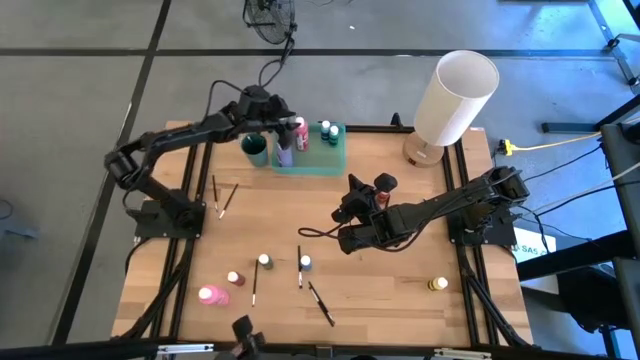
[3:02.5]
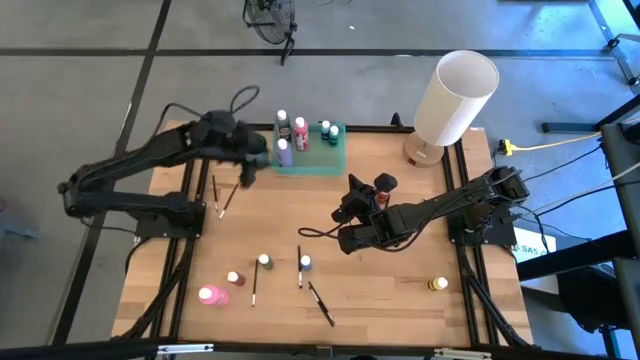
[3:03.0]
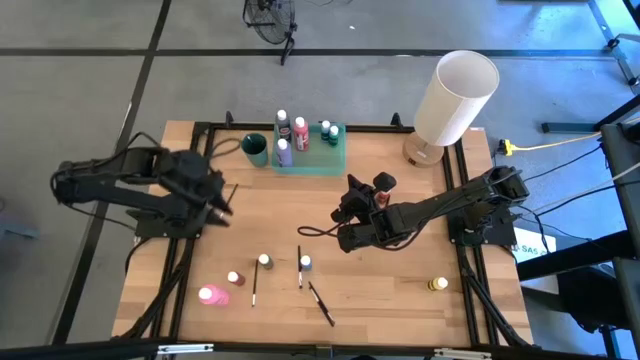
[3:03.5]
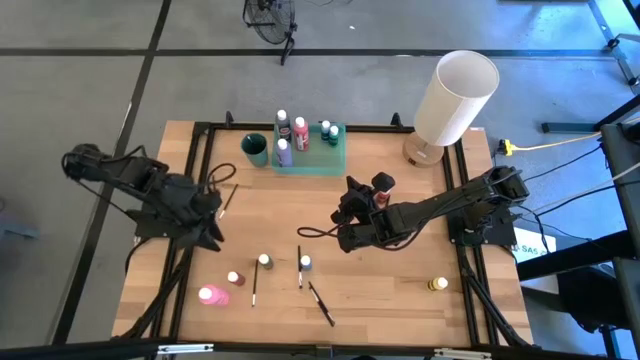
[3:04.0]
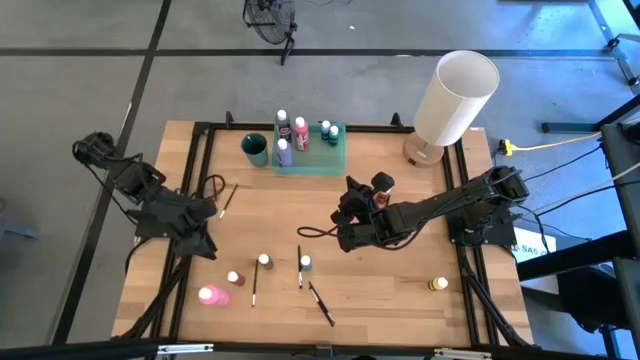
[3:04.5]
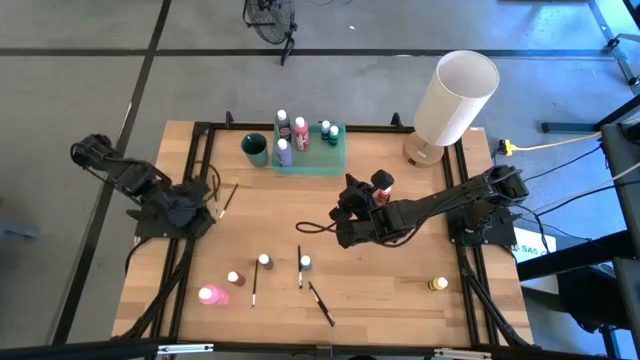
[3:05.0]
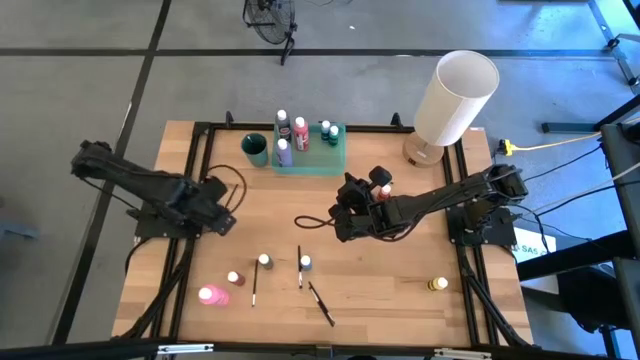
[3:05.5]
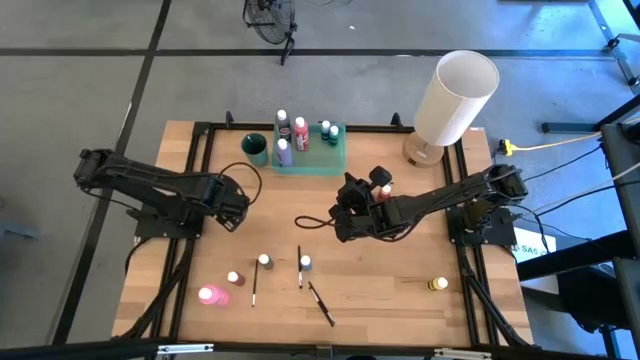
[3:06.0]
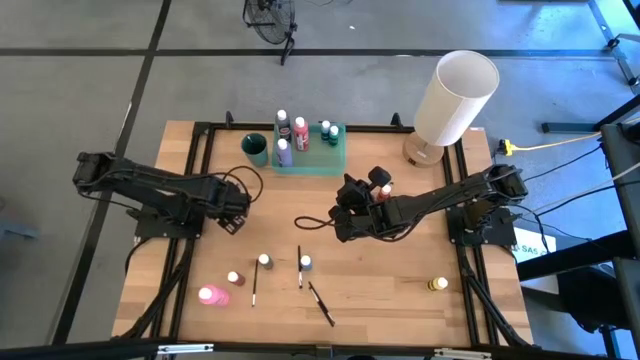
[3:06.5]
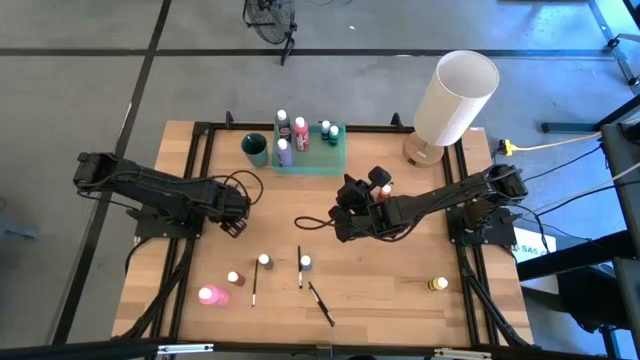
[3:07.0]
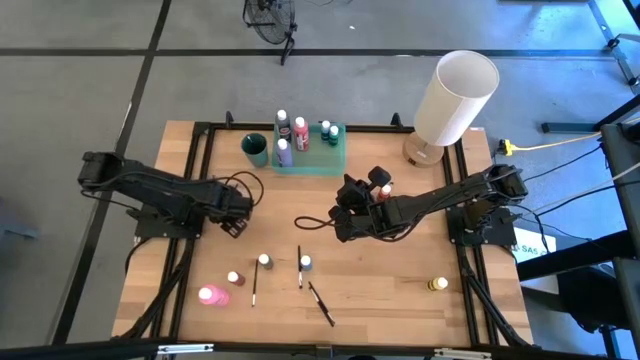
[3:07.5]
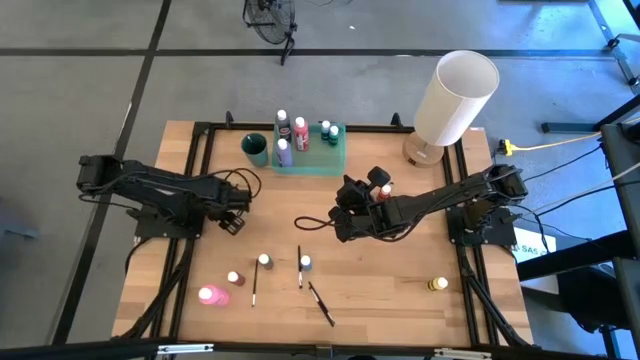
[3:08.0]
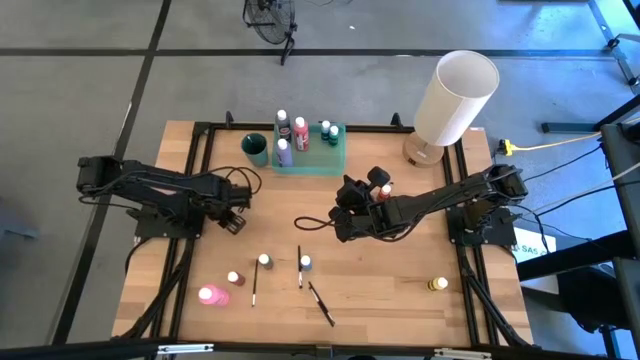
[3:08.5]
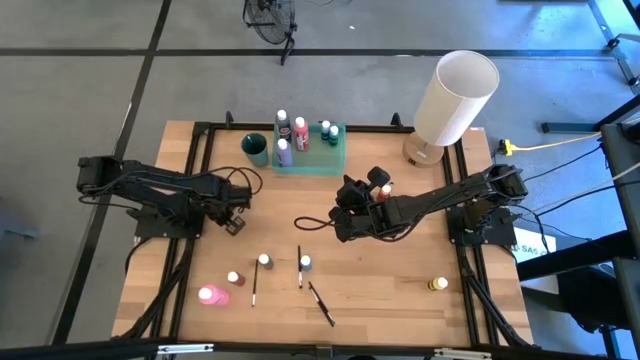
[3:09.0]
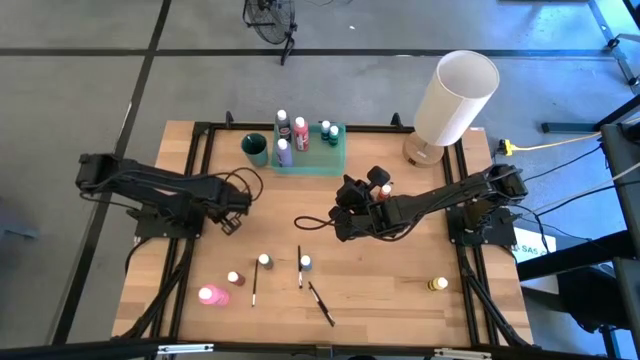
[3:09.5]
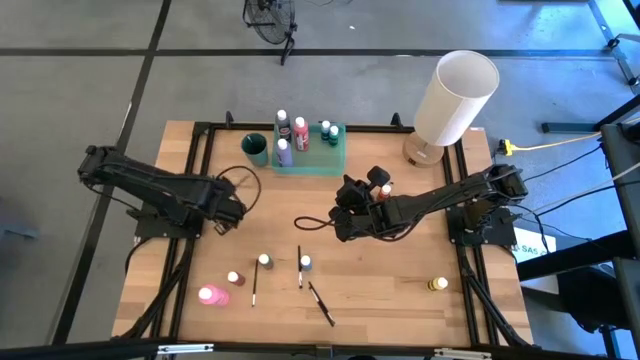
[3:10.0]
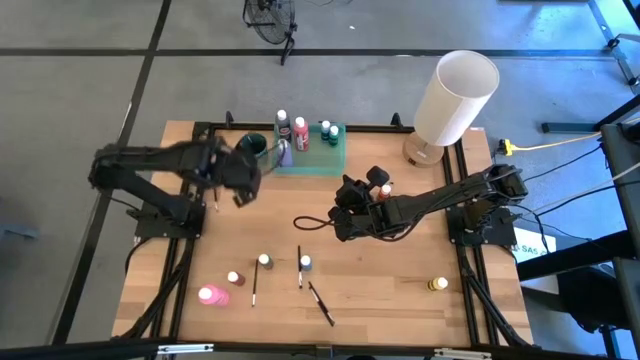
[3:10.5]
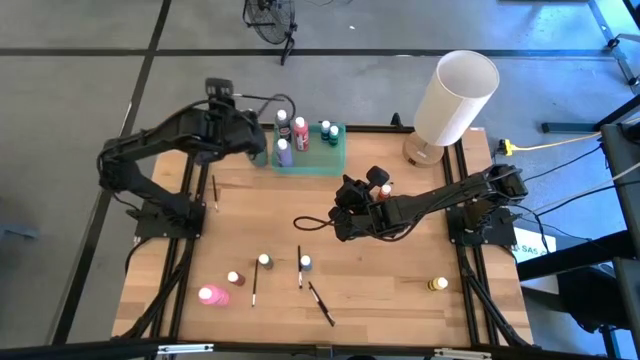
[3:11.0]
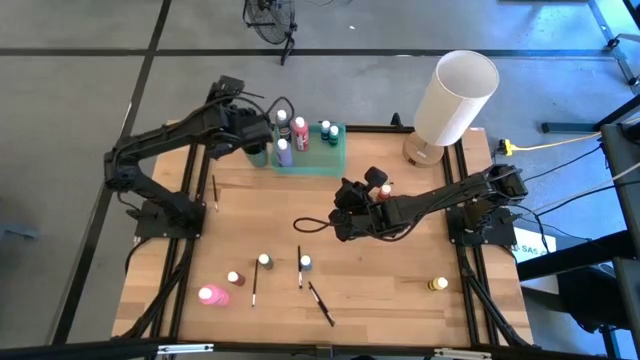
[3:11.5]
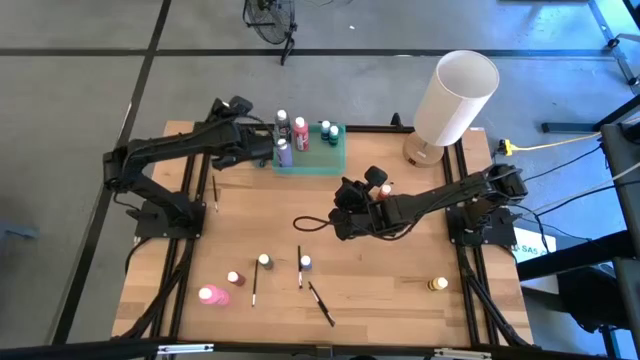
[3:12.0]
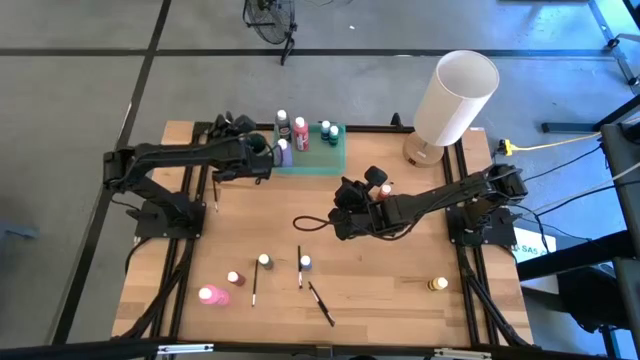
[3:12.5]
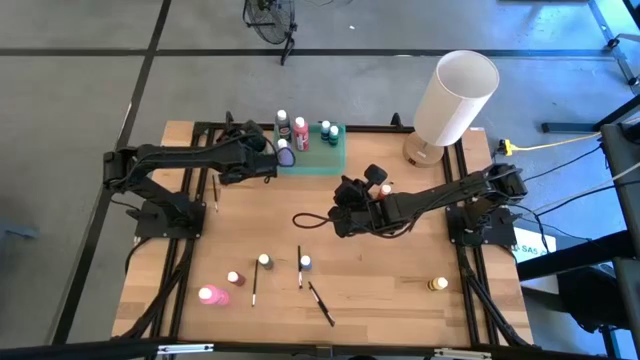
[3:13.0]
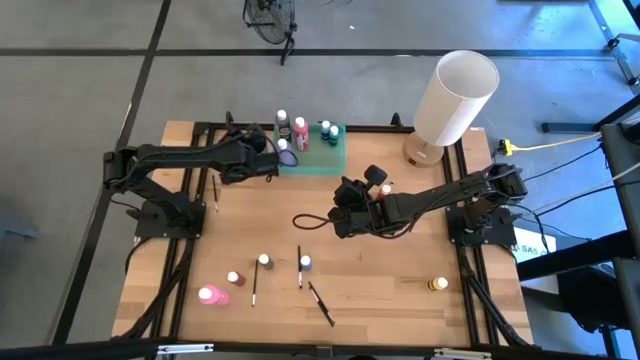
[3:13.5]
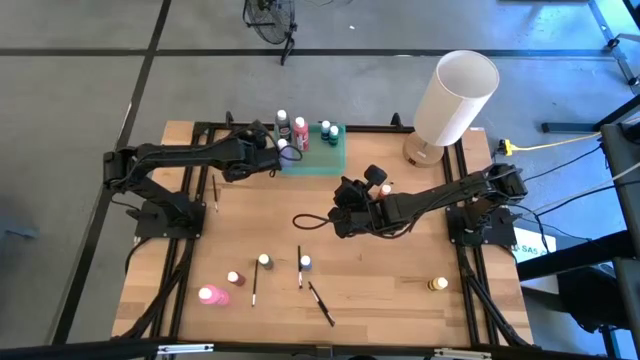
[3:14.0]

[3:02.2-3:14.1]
Task: Pick & Place Paint Supplies
Put the silver paintbrush into the green cup

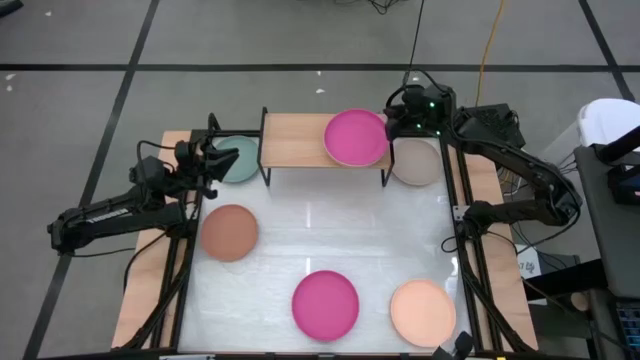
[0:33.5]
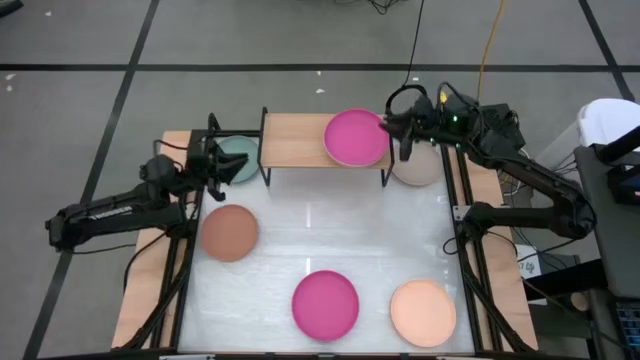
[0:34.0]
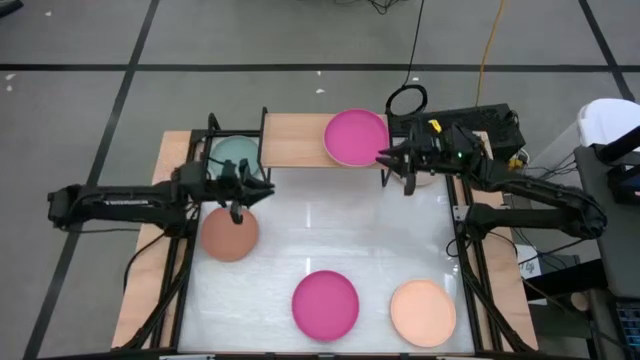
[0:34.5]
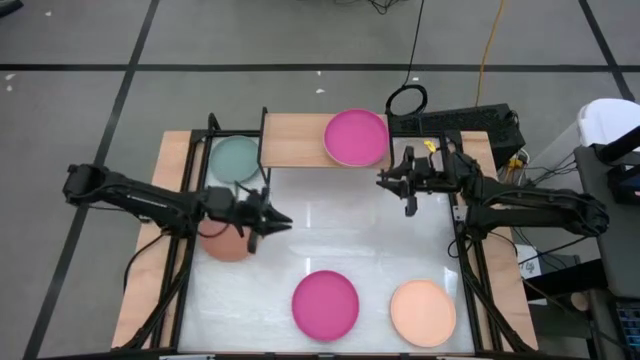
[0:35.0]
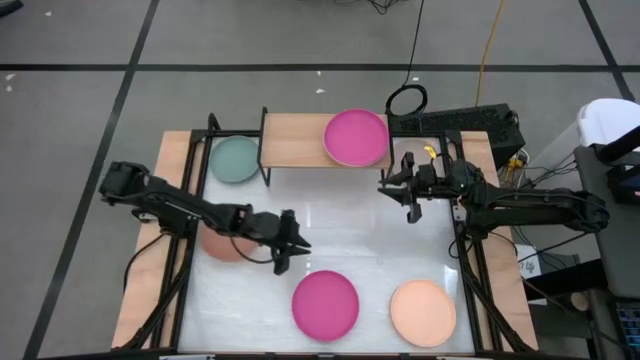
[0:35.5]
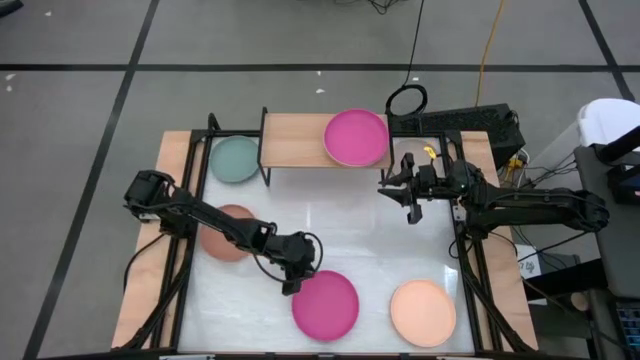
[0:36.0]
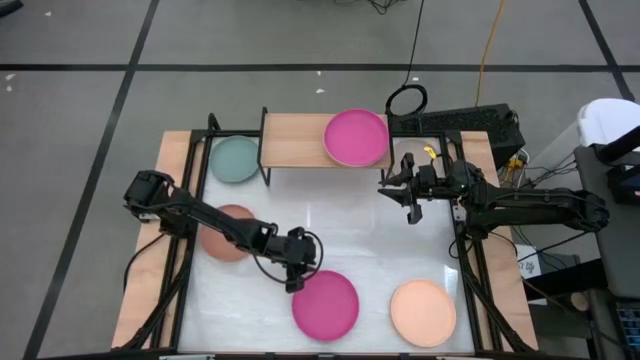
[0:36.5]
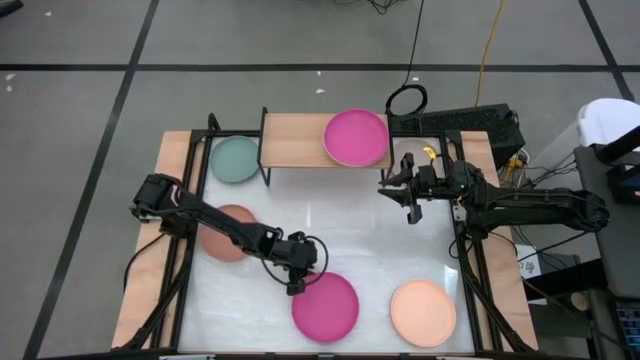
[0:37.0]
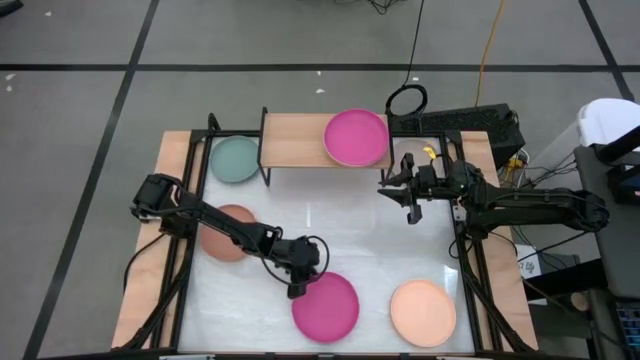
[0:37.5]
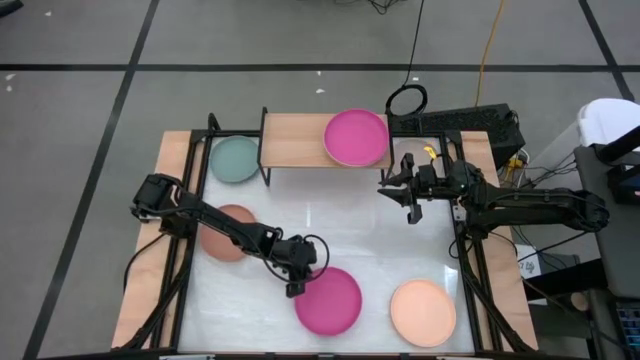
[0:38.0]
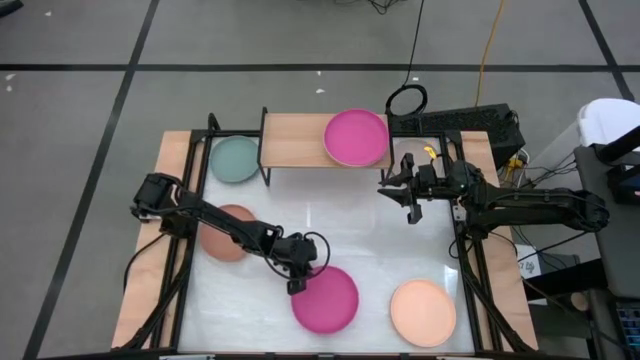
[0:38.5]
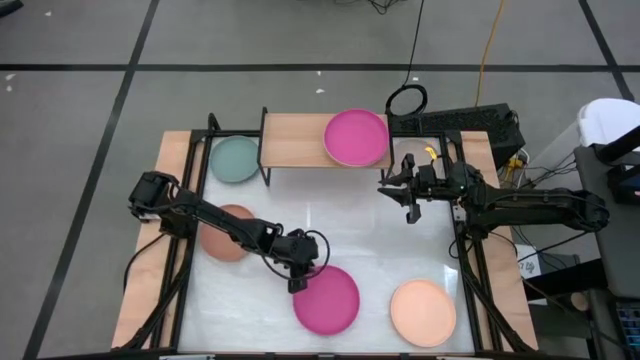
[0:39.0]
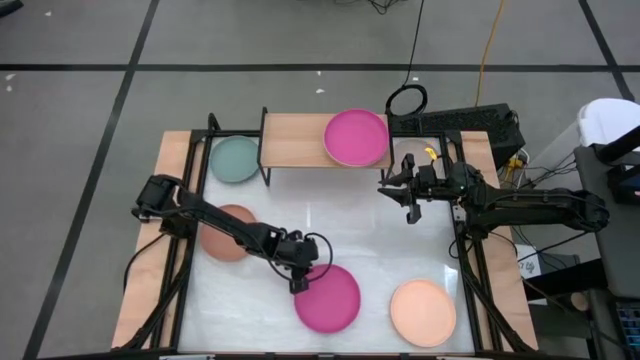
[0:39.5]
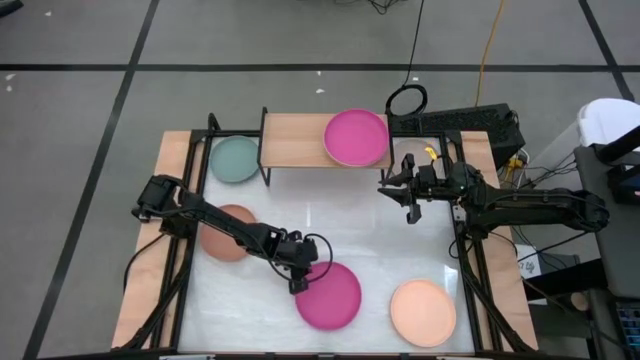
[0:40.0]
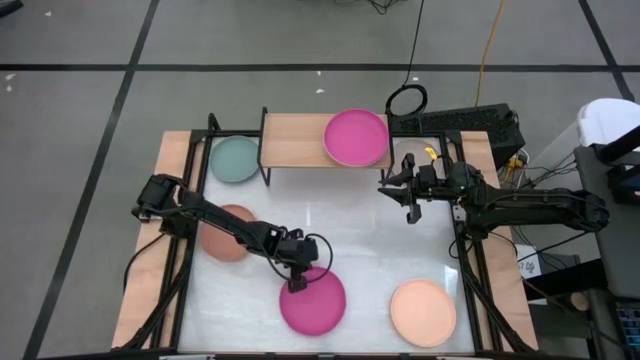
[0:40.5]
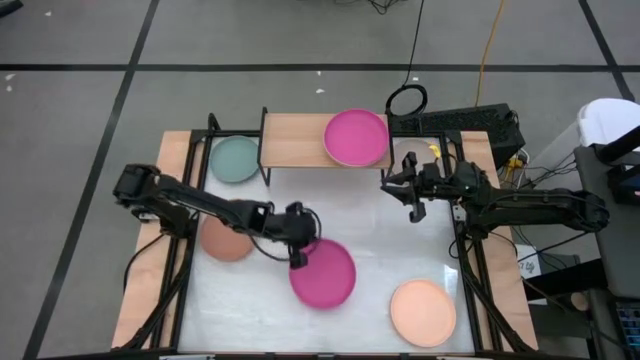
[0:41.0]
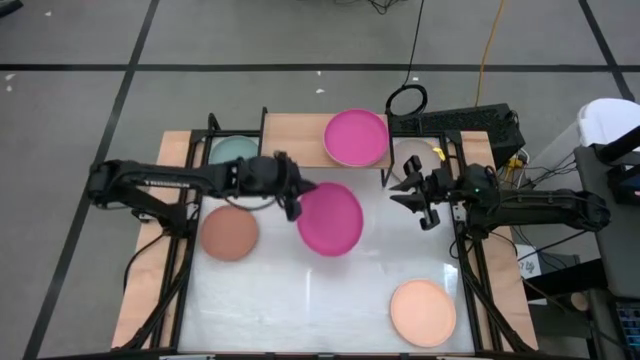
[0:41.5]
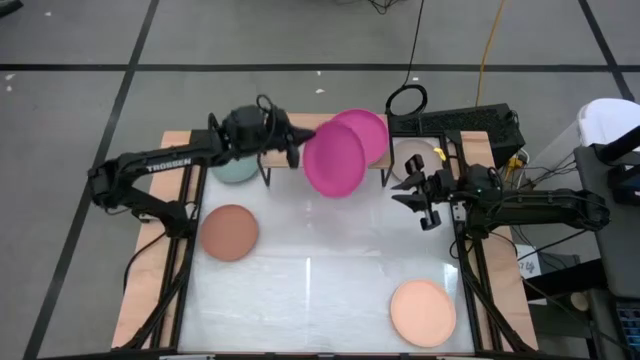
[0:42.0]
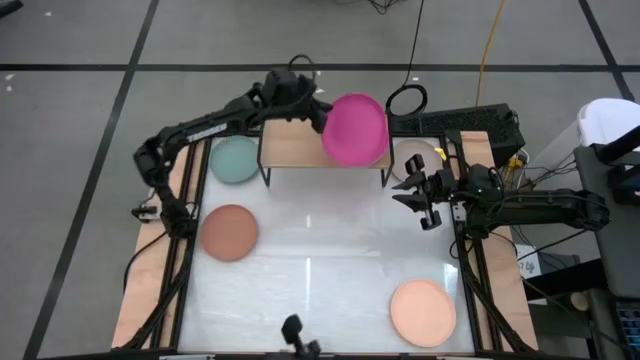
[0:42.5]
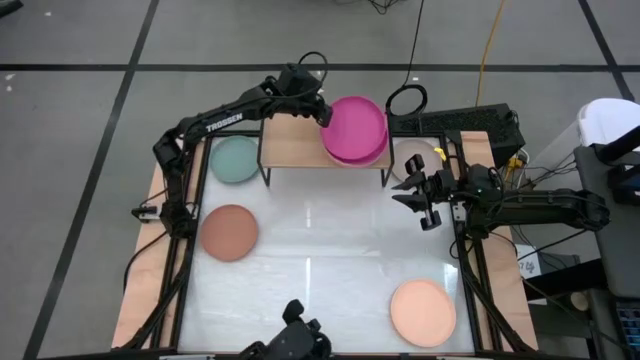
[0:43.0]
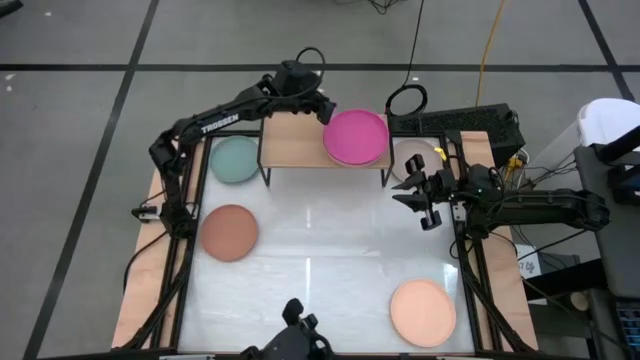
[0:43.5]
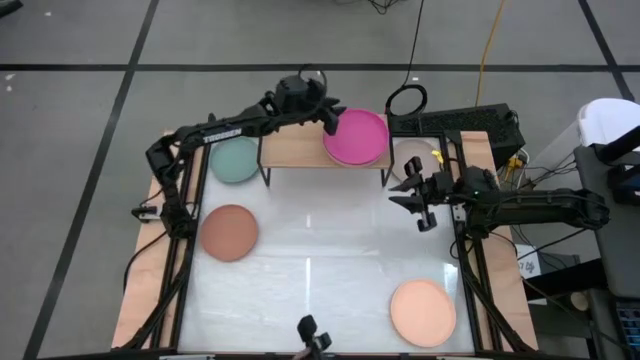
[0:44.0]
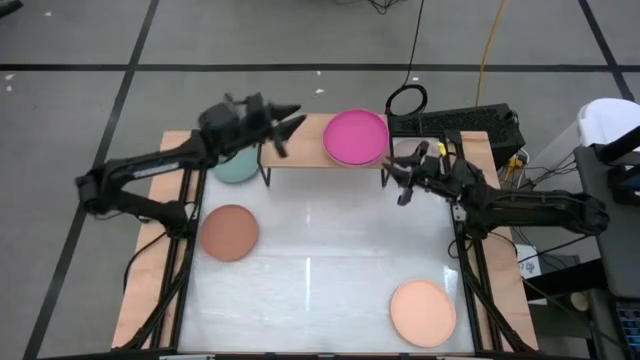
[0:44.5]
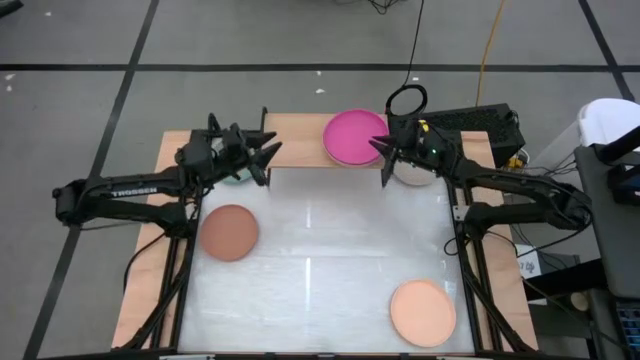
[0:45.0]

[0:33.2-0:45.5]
Task: Place and stack plates onto a shelf
Stack the pink plate on top of the pink plate on the shelf
